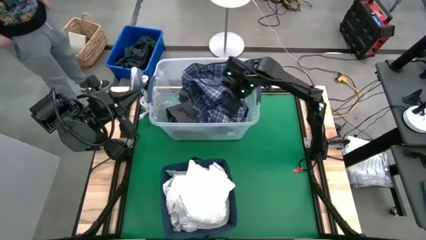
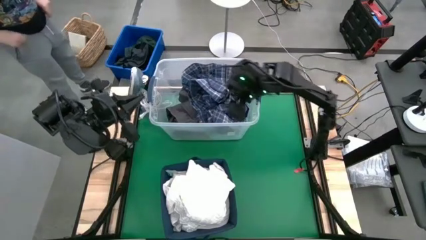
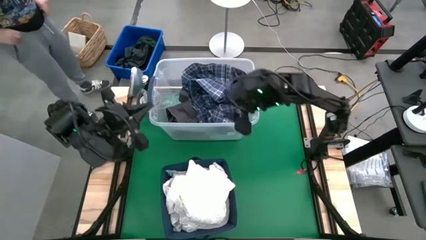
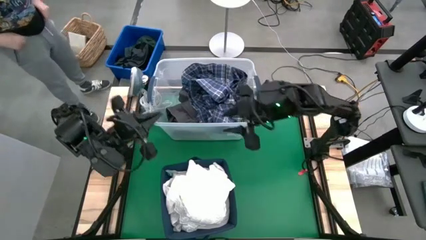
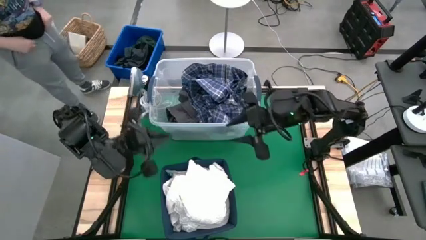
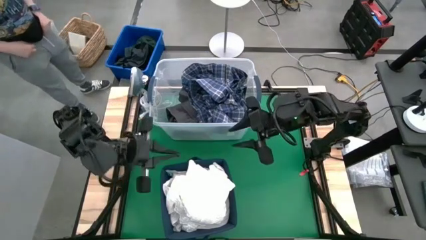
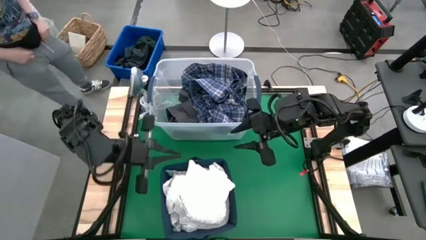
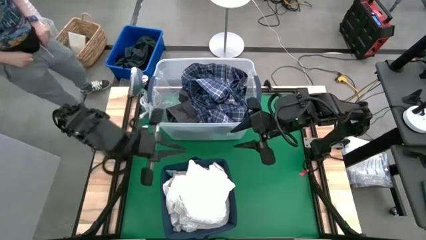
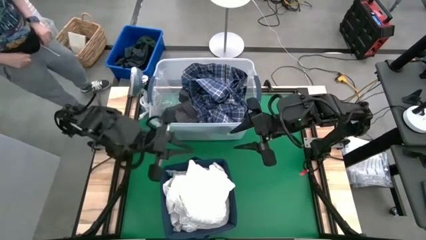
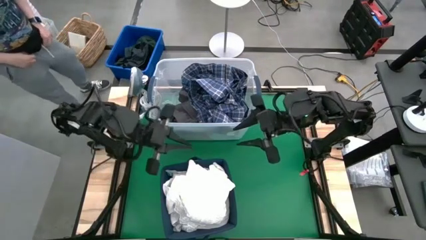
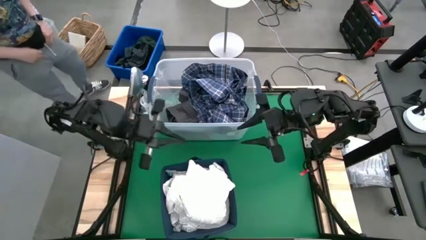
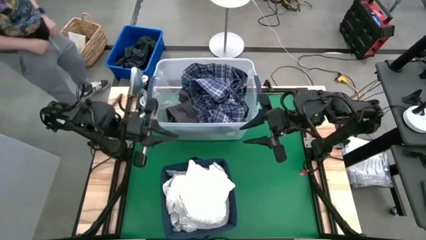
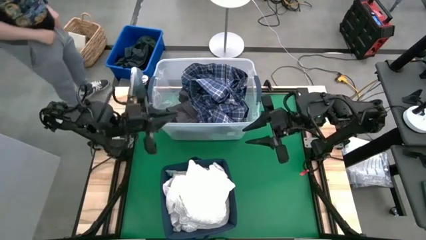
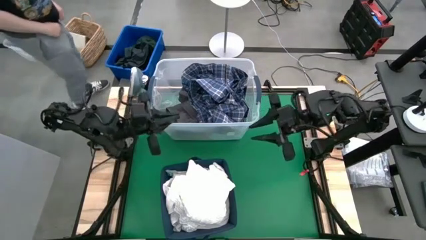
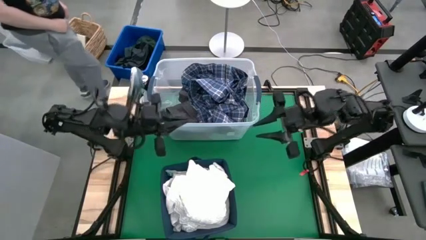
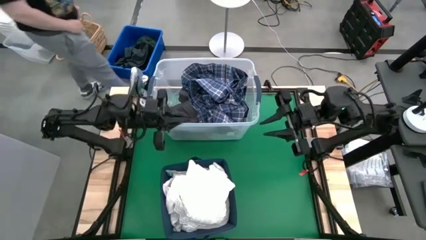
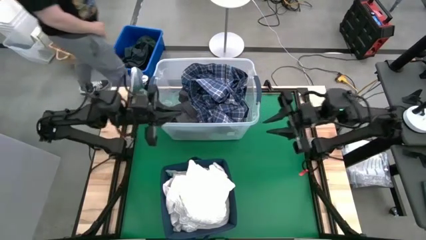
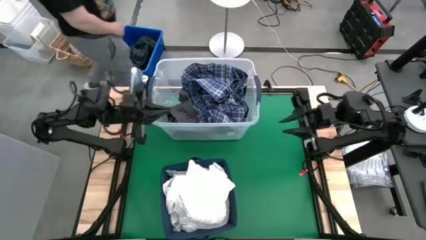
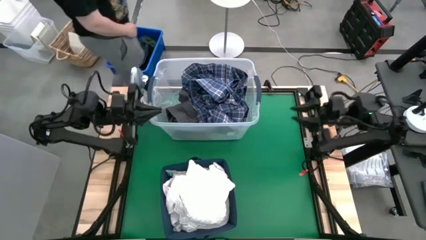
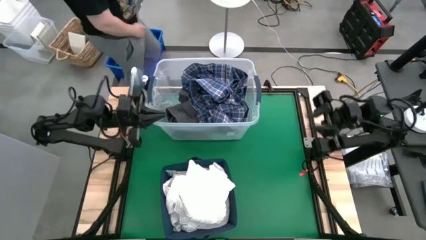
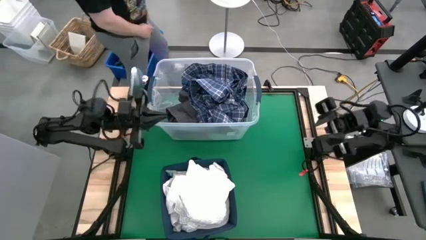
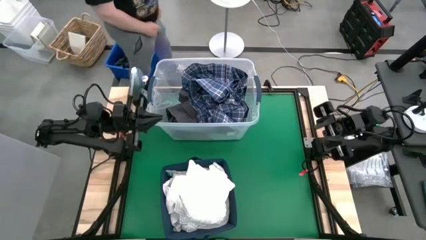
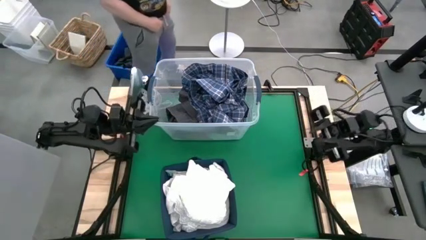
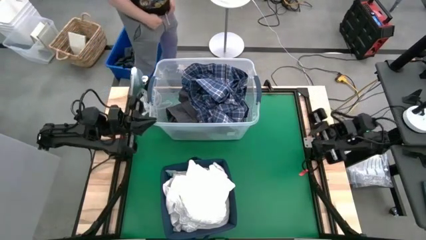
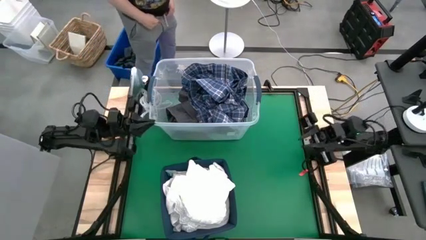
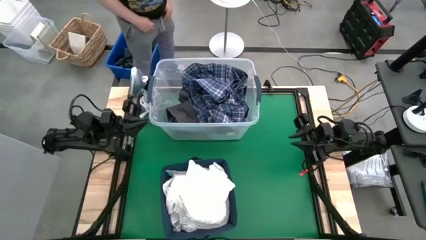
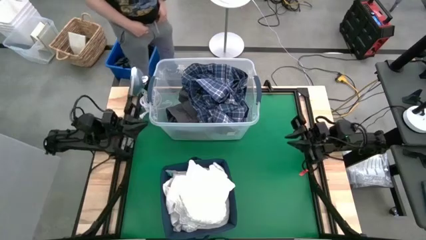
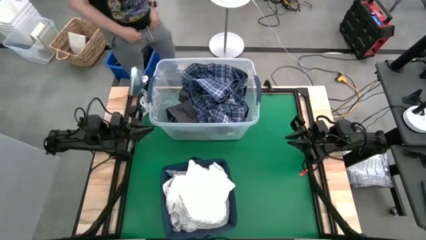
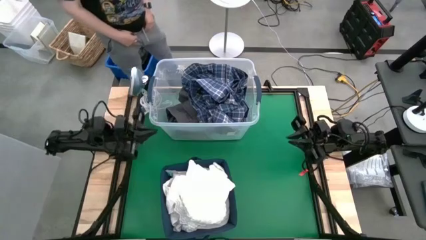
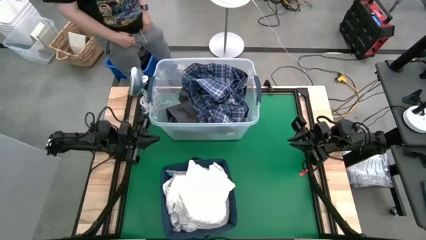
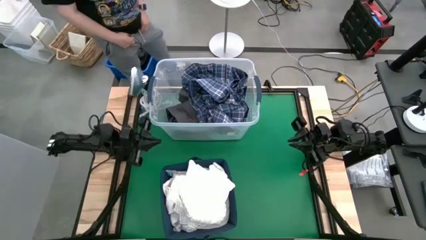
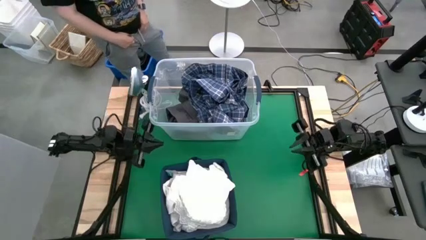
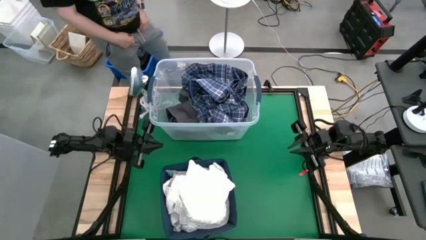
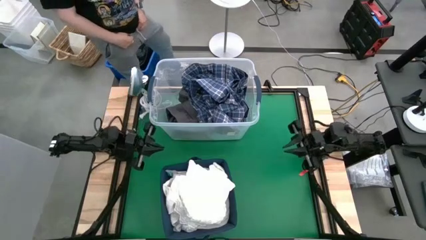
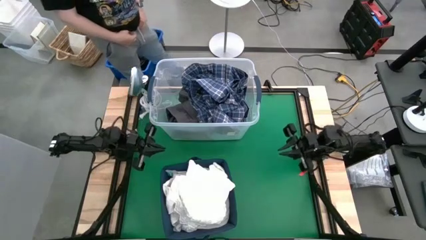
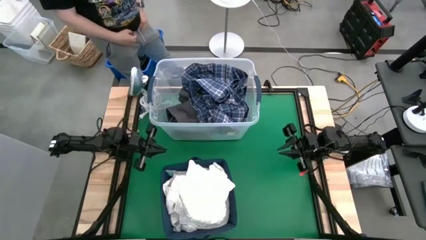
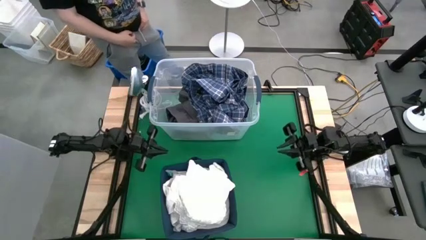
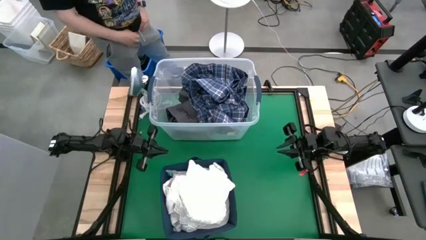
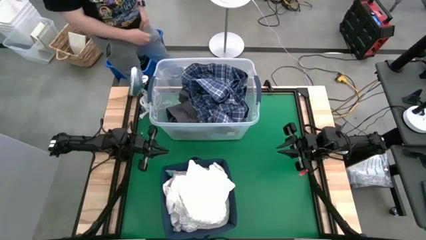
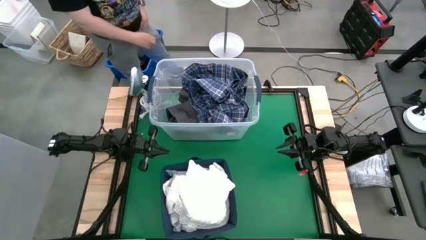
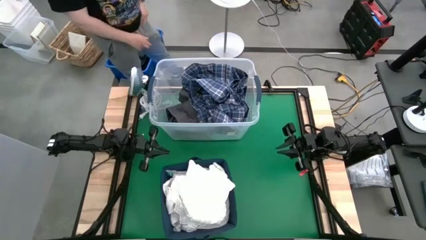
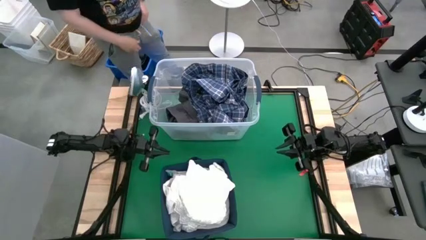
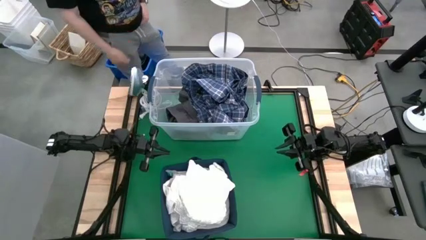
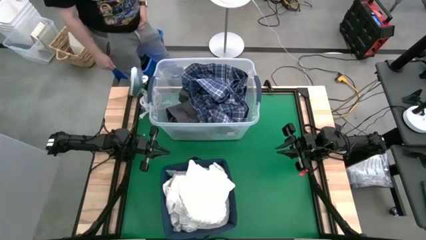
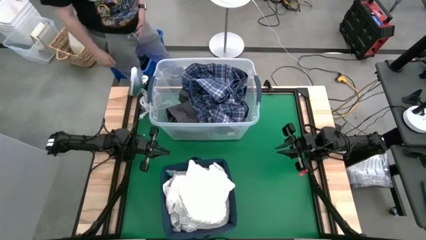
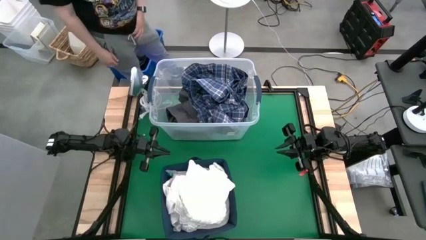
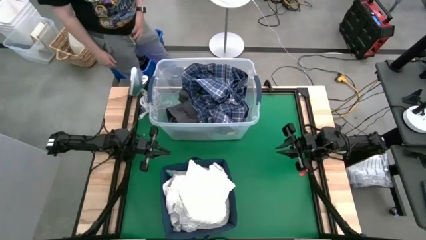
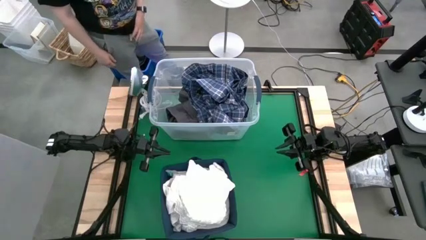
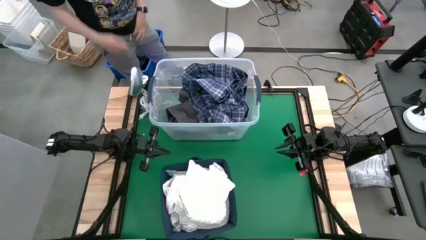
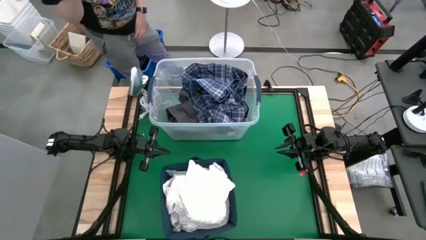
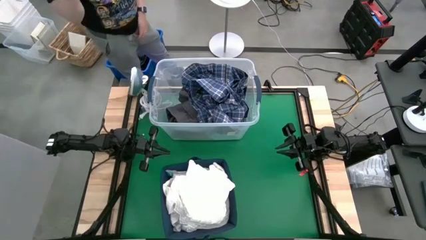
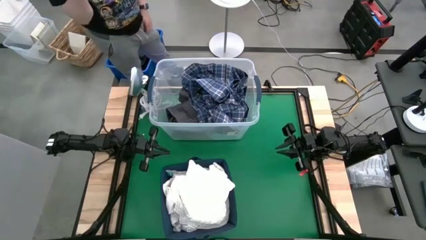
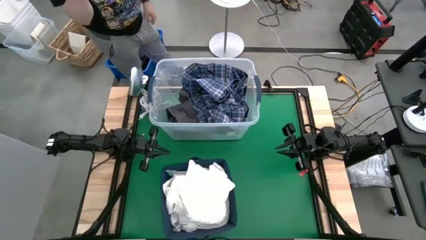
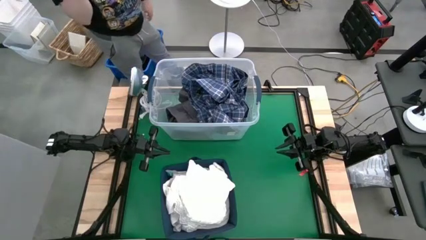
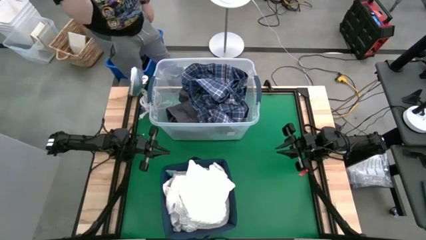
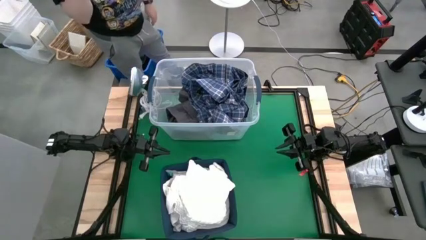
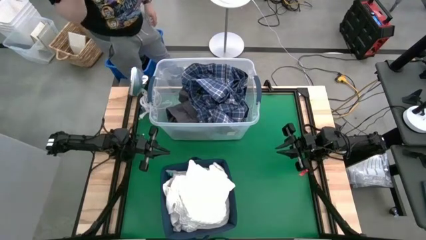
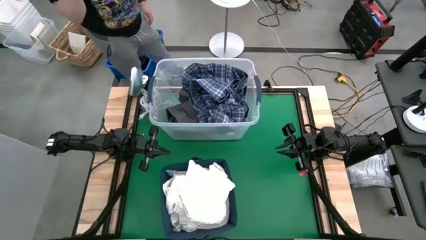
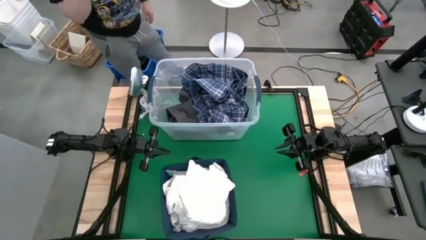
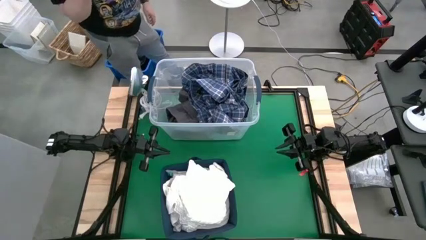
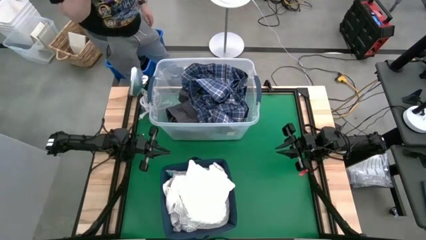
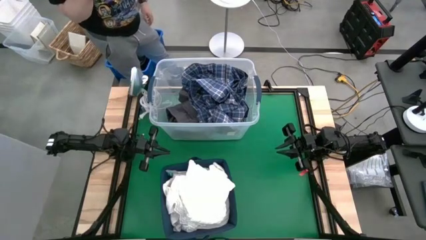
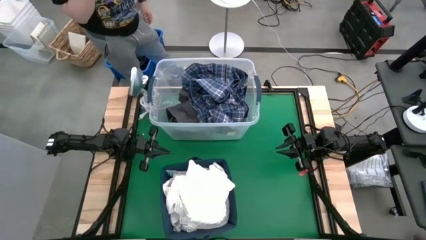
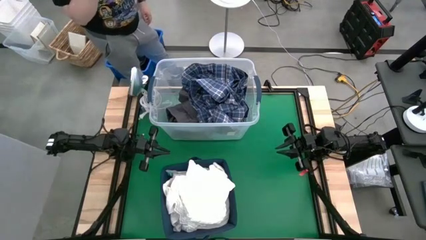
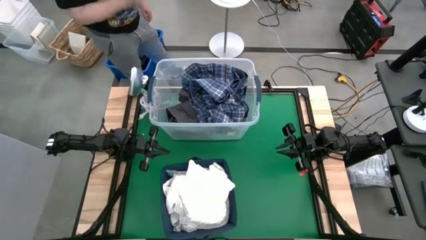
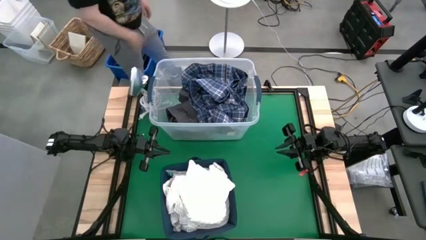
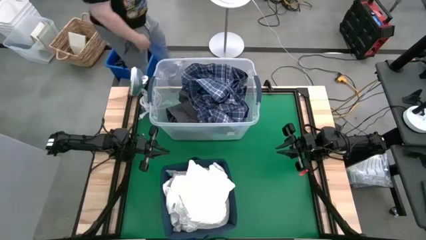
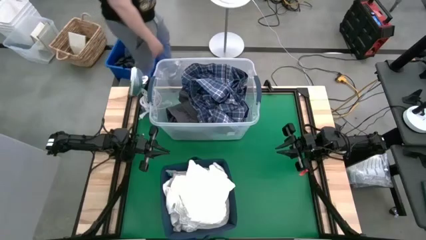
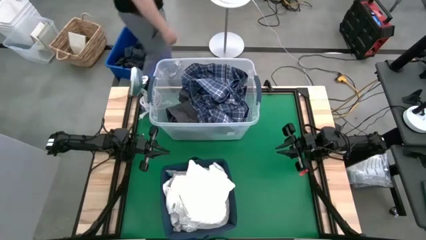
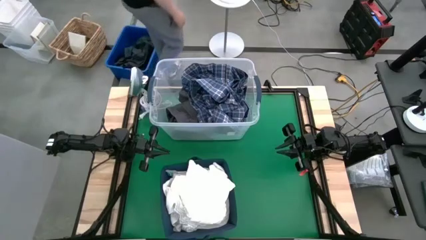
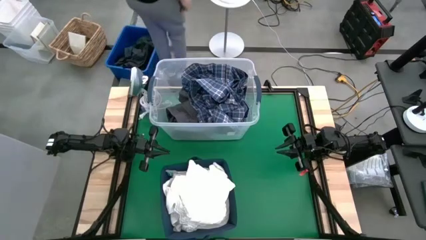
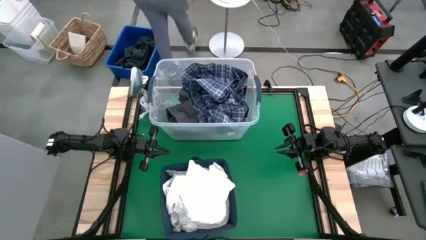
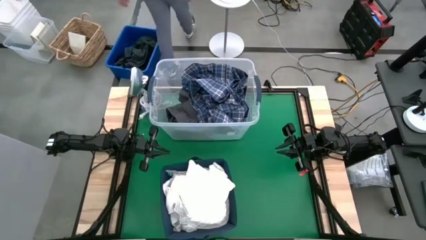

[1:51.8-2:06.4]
Task: Sort clothes
Return to Home Position

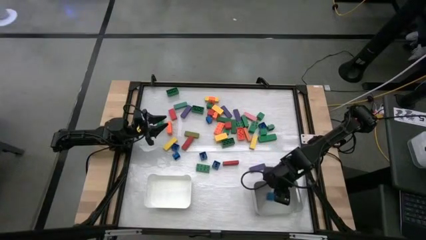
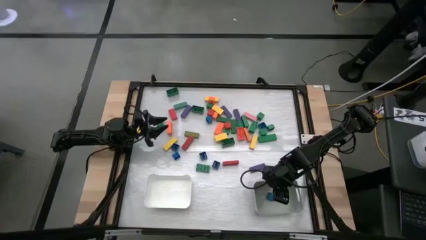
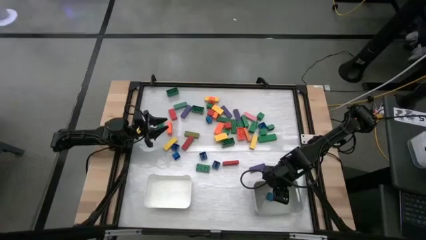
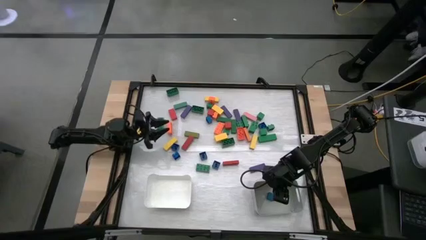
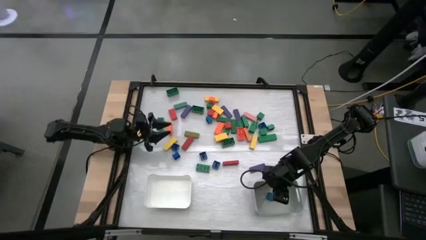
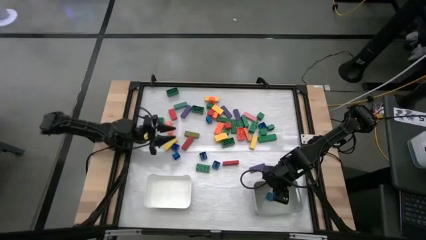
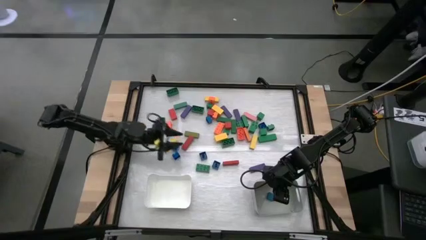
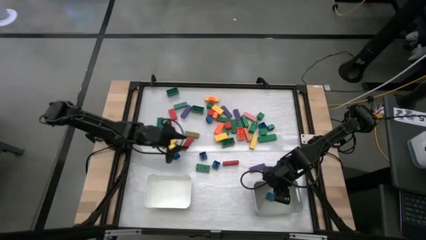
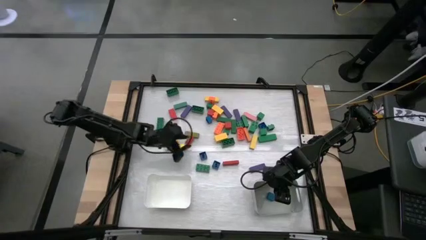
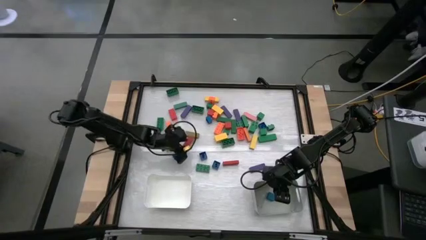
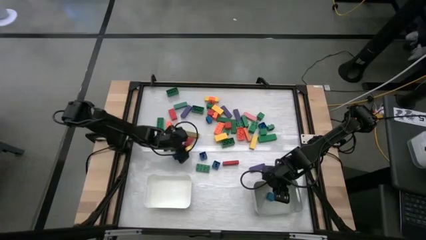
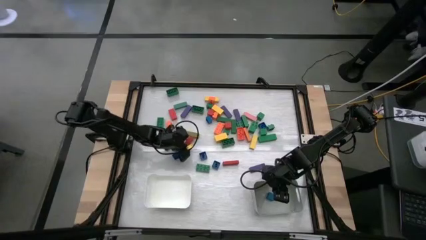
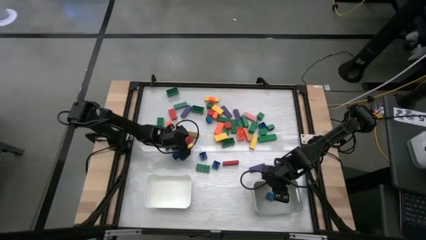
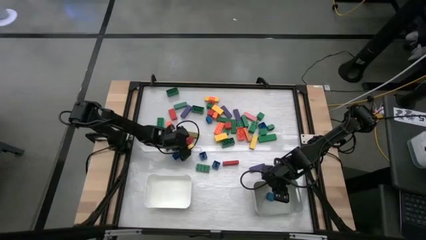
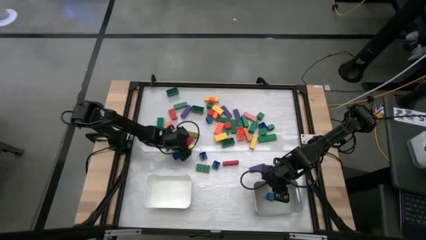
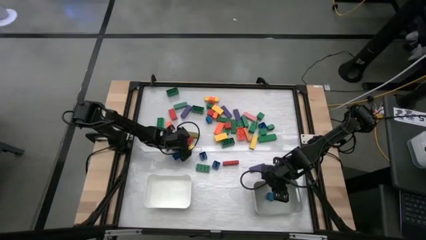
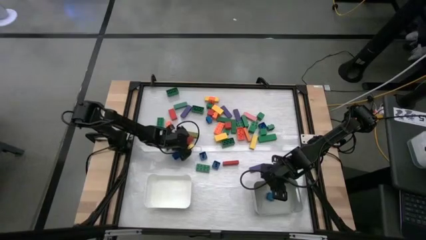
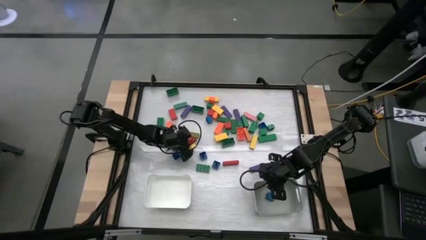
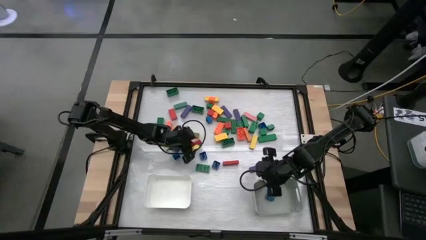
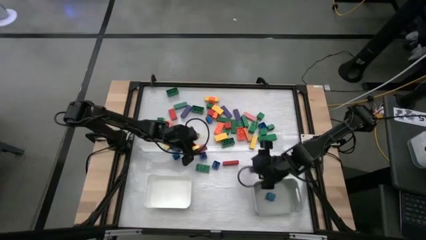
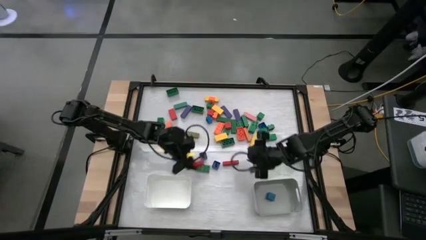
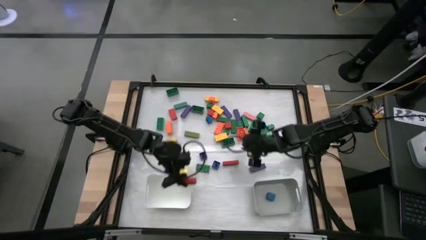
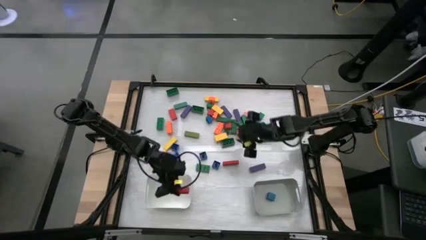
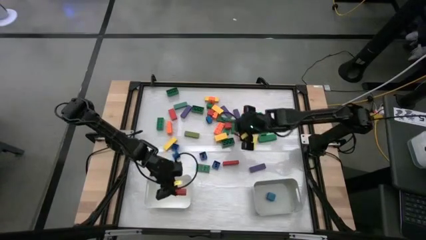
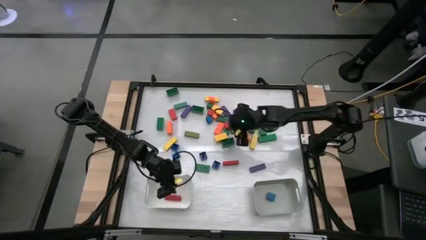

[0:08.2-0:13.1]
Task: Sort blocks by size
Put the rectangular red block into the white bin
